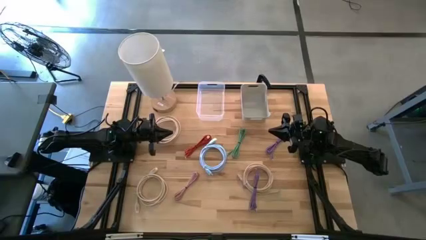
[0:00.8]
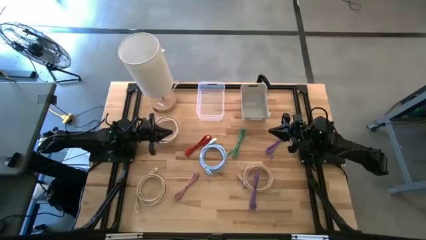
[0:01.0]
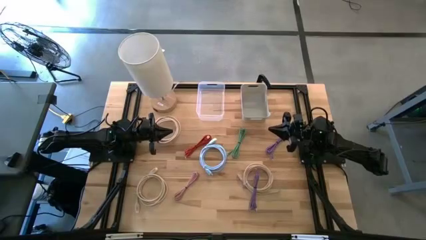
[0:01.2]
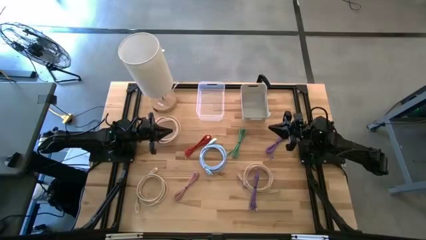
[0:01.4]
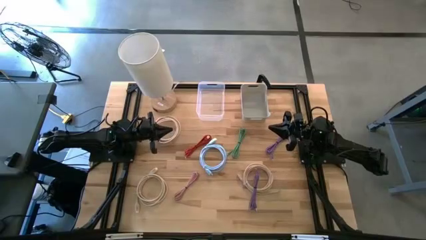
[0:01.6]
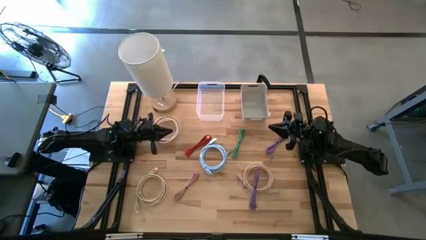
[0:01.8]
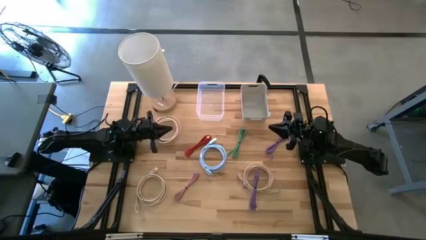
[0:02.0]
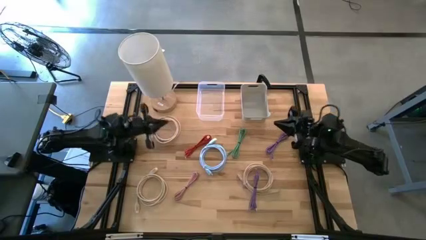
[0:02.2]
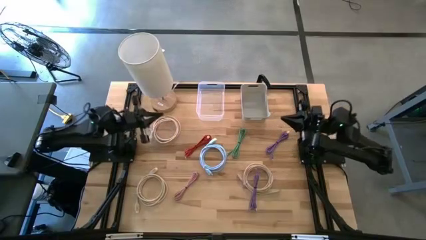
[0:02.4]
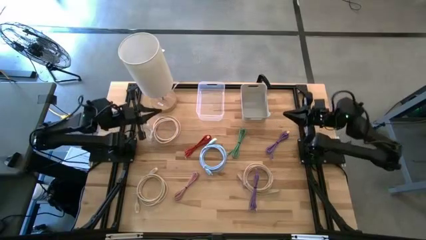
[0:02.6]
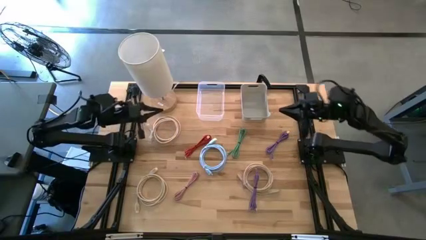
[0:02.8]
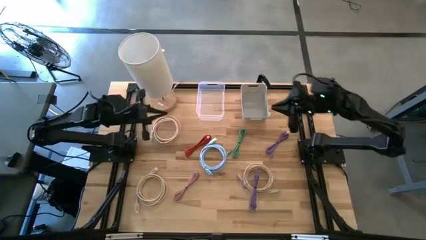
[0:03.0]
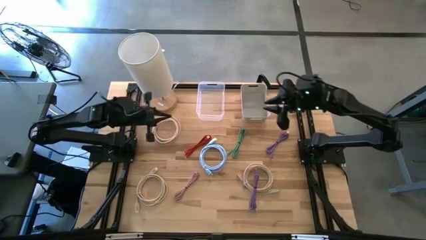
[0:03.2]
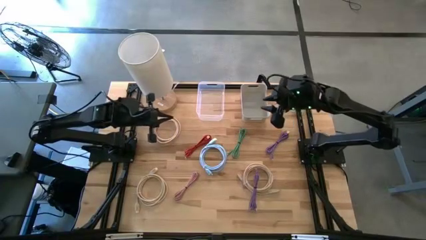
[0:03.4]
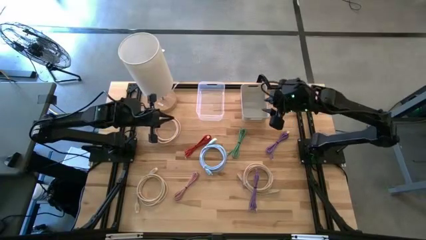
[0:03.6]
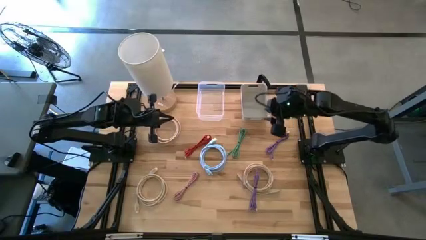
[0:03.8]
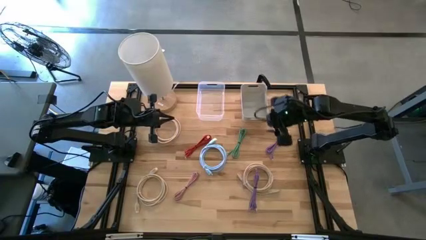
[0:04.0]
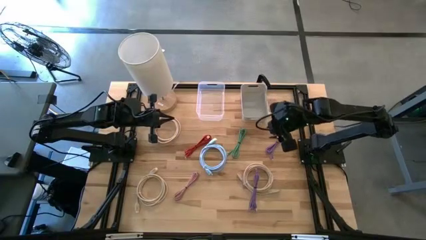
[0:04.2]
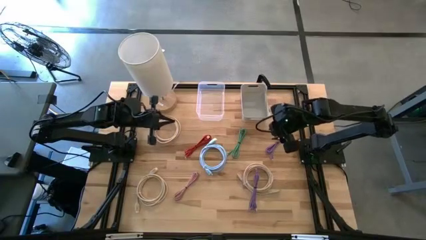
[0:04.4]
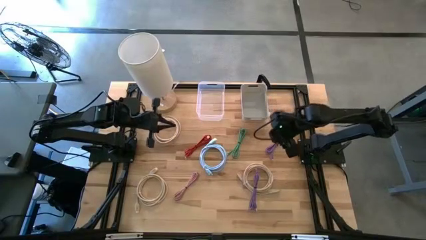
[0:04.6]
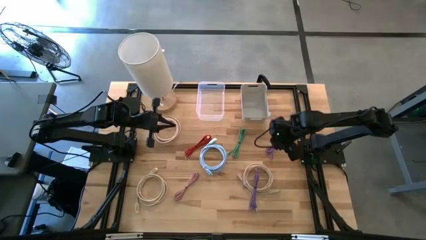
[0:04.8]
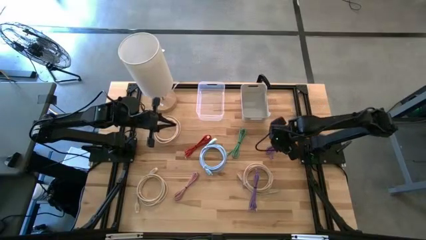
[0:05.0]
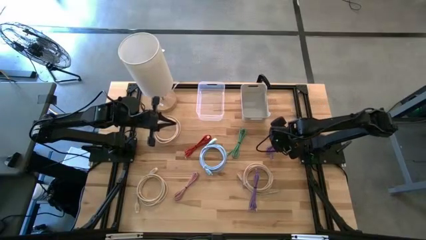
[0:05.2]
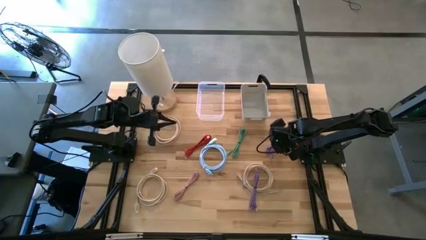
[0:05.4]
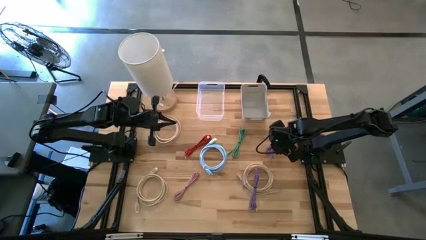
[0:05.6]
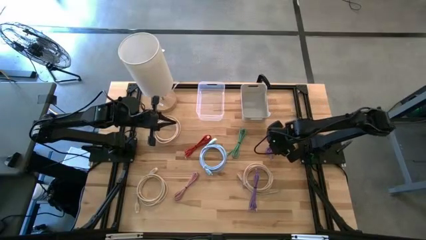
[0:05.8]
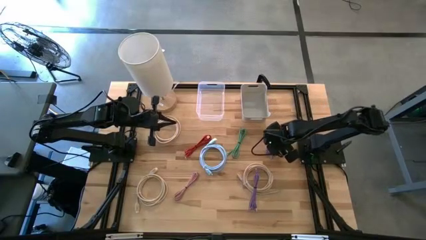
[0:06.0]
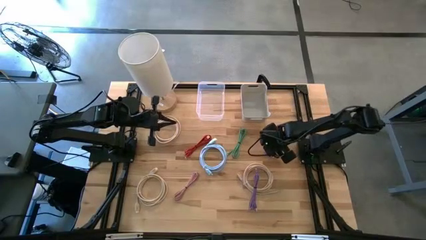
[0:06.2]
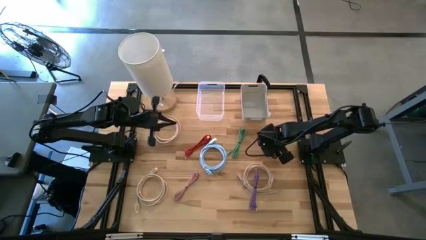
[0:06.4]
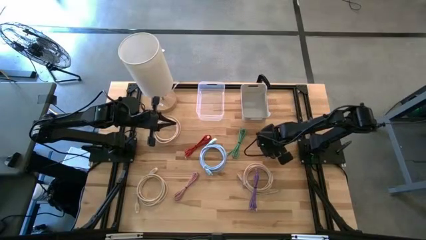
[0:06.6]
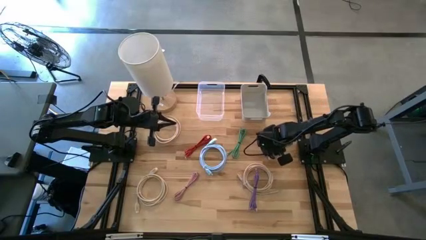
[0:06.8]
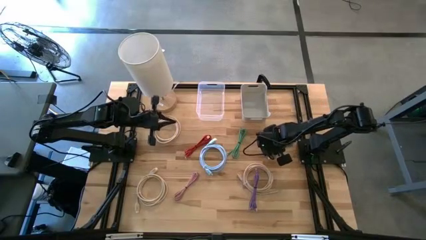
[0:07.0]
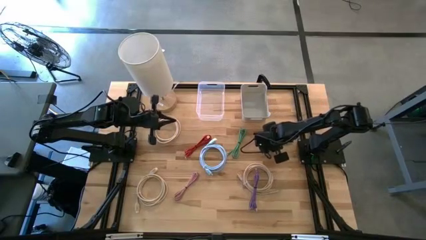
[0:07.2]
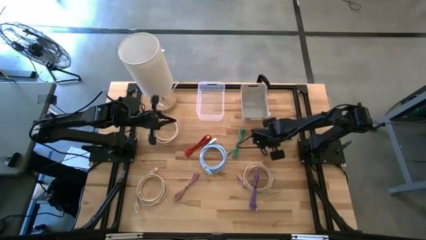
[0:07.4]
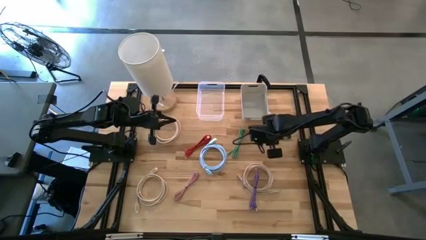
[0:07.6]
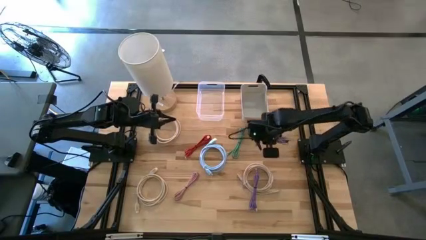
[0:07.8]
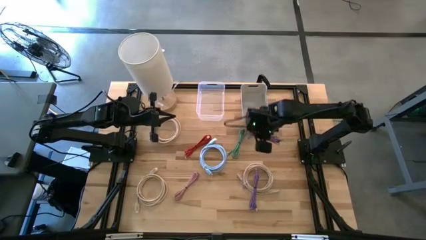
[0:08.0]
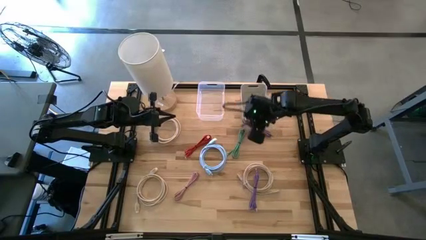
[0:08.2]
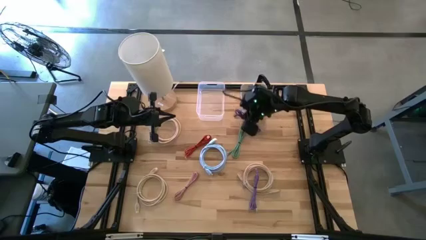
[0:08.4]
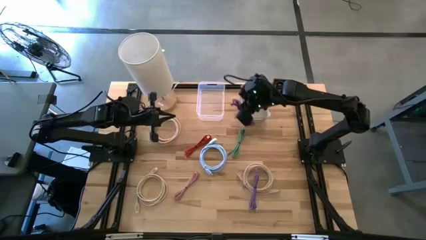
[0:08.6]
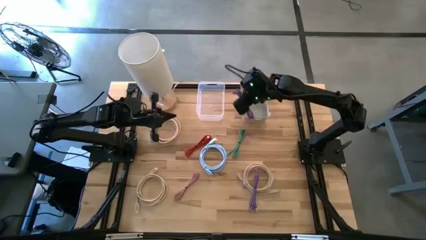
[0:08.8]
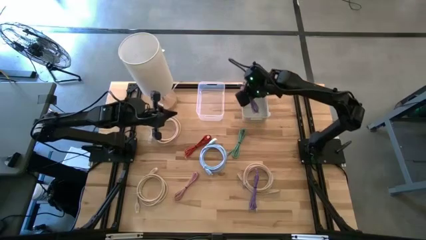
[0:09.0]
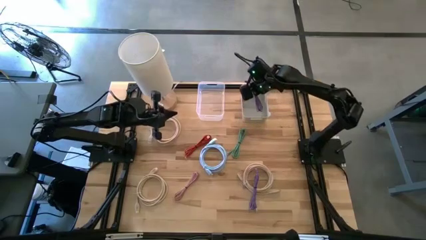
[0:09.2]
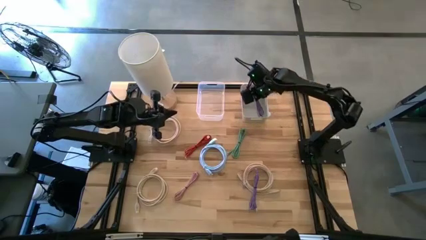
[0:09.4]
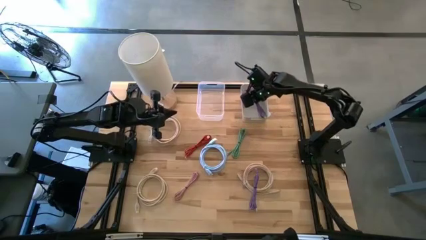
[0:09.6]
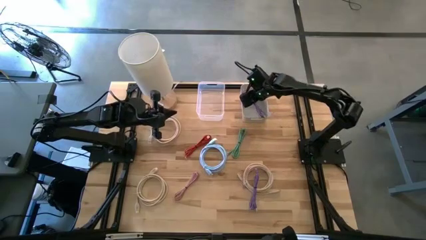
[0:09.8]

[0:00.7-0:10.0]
Task: Pick & Place USB Port
Put the top purple charger cable into the gray bin

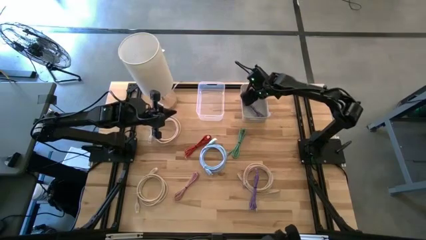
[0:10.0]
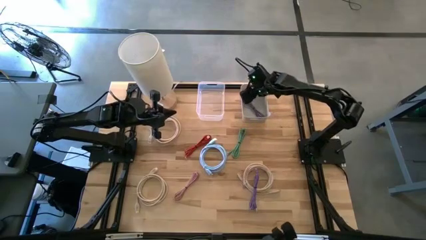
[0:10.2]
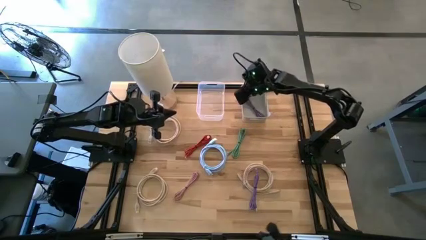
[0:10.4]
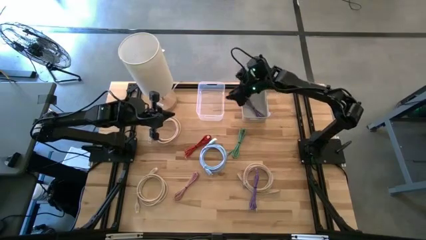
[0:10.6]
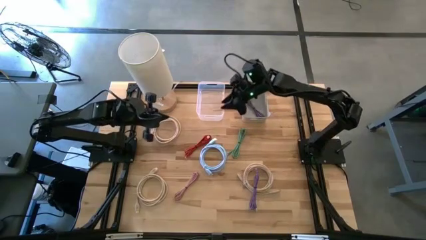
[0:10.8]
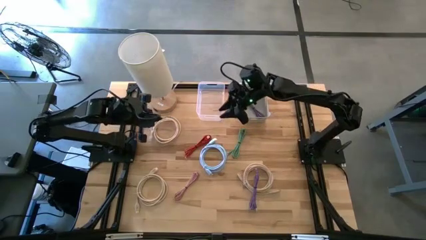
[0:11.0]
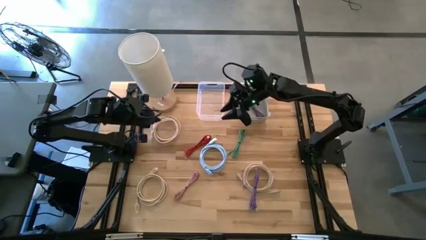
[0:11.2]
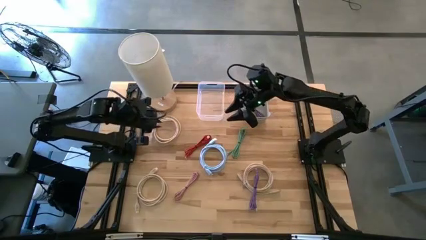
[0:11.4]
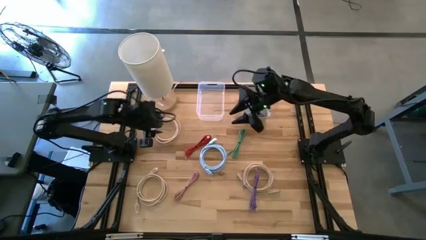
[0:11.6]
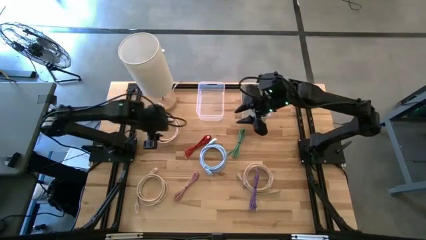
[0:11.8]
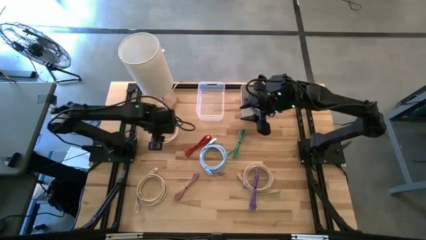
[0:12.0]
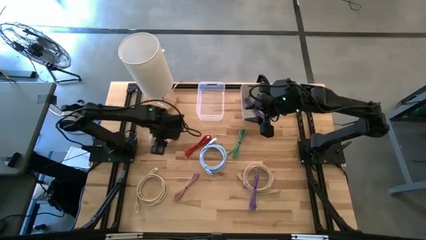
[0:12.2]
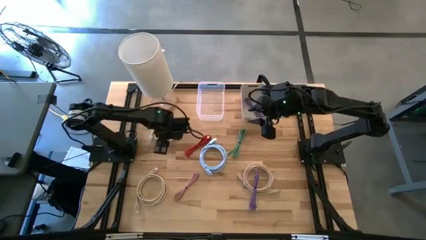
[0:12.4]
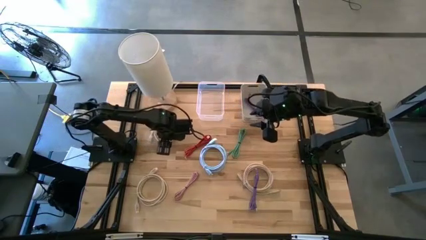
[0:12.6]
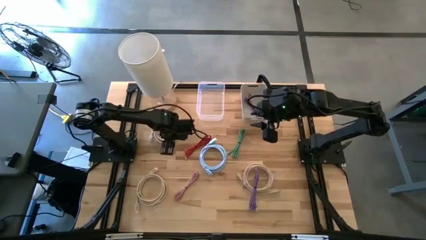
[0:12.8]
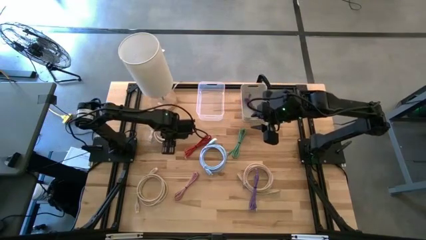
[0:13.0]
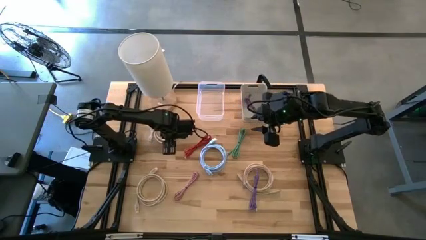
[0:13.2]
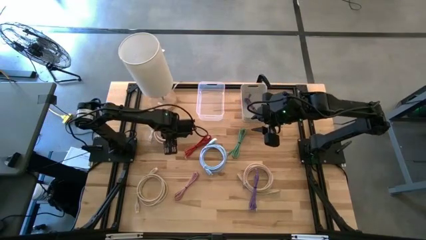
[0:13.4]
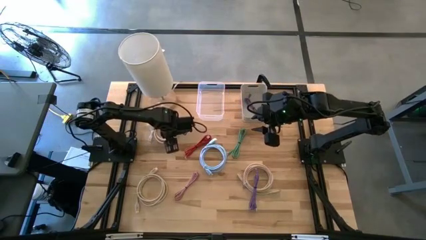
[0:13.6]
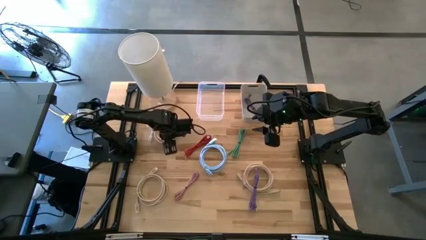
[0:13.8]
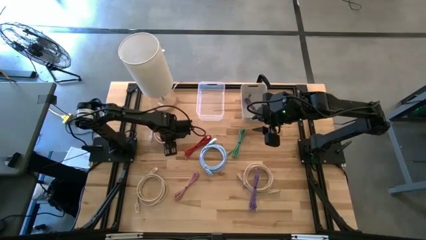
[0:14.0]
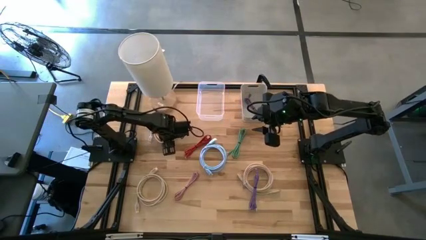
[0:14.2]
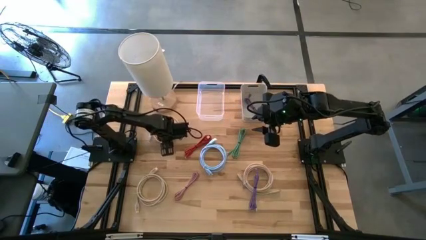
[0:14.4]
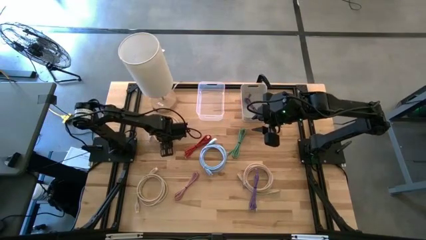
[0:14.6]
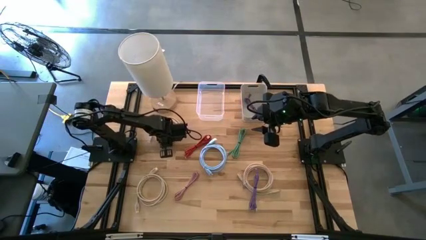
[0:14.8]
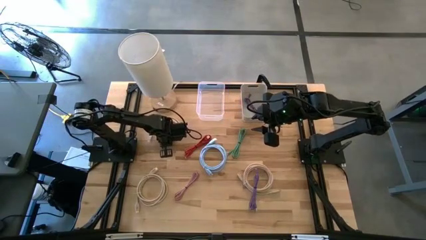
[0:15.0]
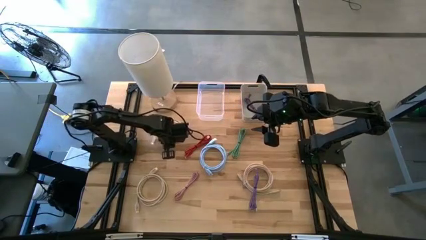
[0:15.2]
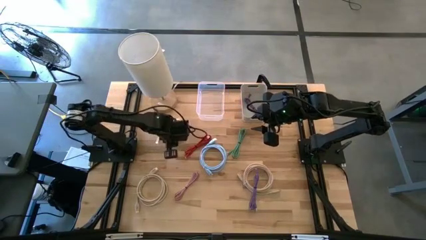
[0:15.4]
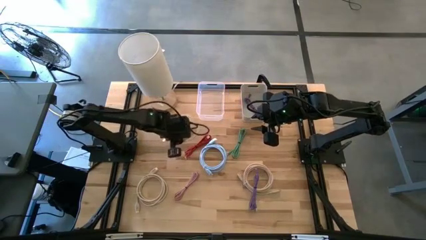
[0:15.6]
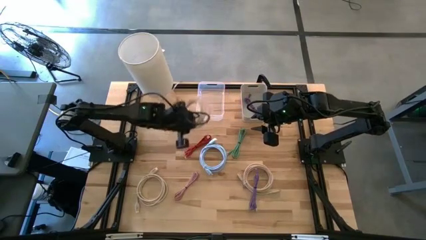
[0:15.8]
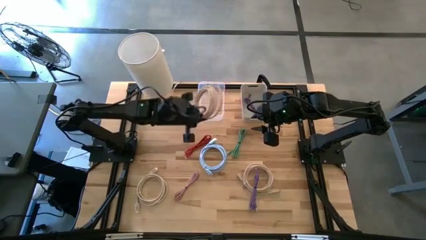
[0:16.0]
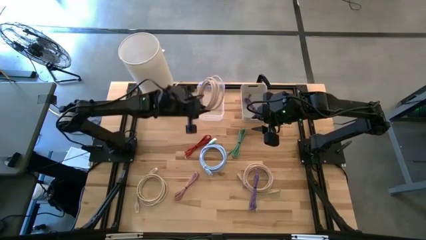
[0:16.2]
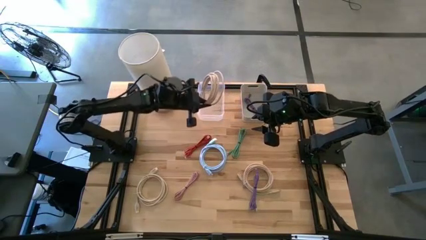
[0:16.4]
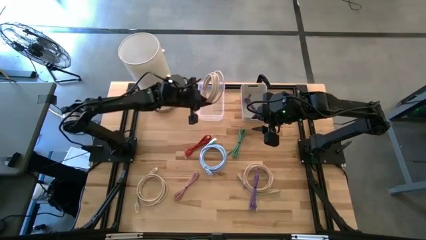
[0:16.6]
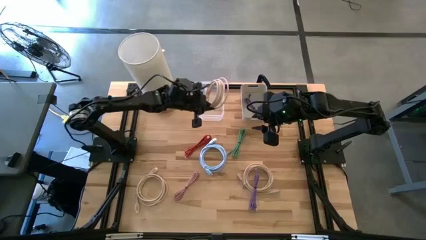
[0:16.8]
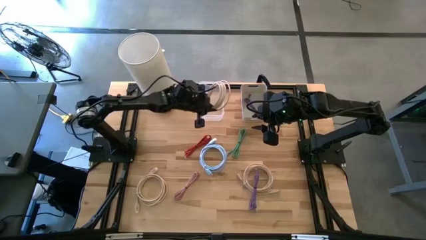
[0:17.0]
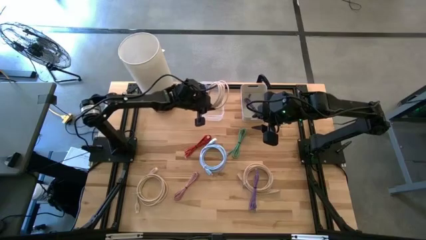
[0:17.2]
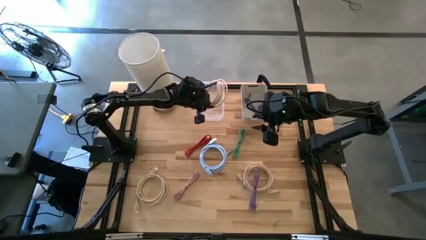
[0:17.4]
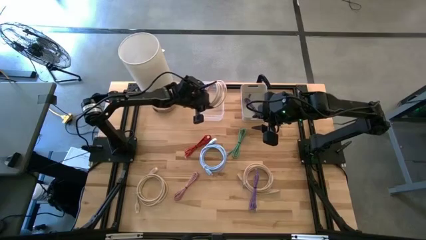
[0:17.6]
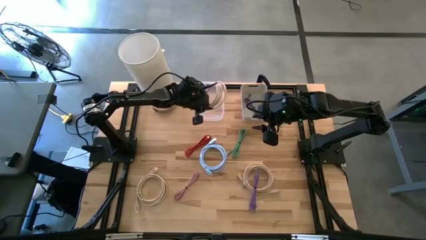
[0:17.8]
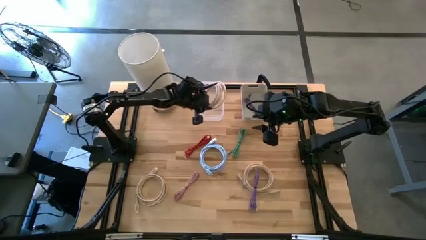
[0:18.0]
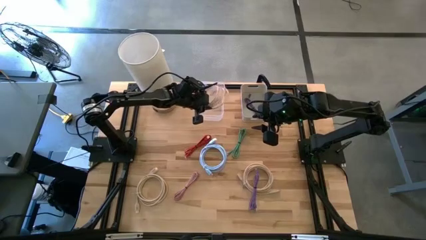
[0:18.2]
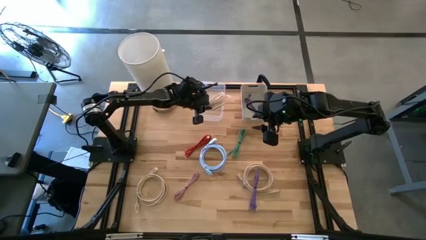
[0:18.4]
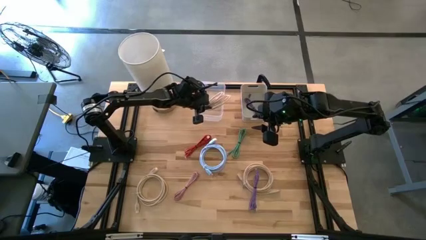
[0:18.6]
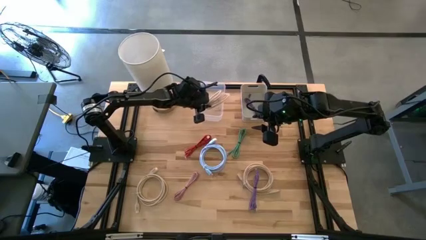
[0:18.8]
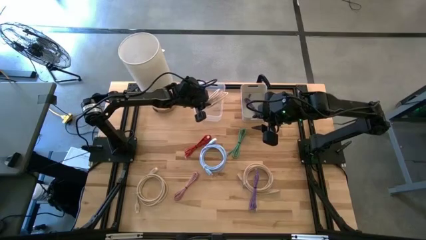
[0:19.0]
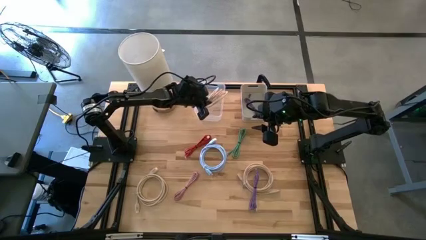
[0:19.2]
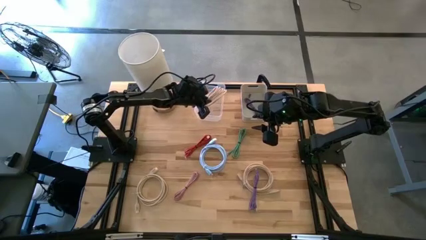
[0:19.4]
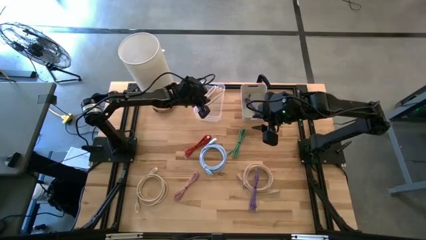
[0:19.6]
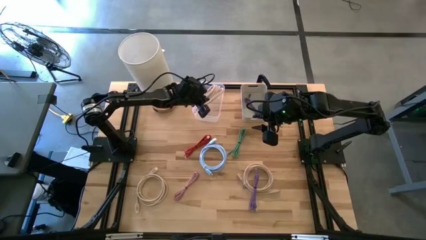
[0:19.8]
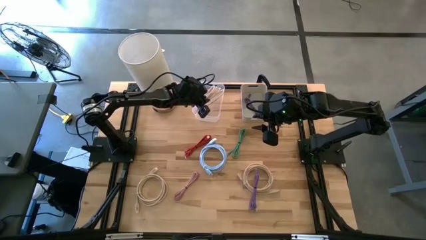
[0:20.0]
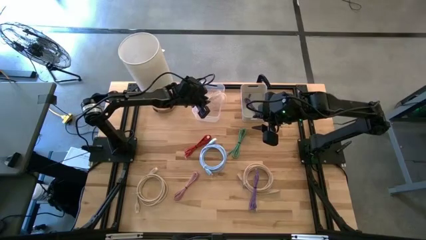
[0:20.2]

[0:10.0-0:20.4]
Put the top light yellow hdmi cable into the transparent bin
